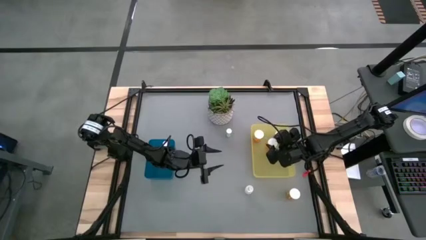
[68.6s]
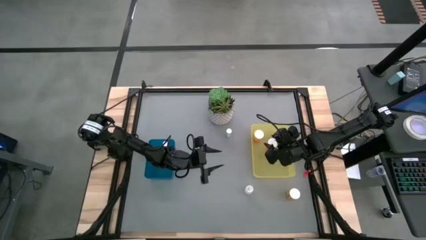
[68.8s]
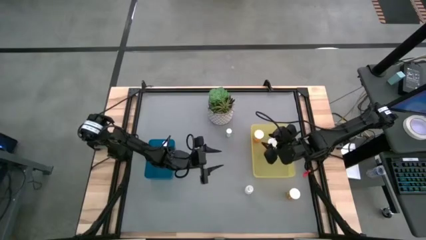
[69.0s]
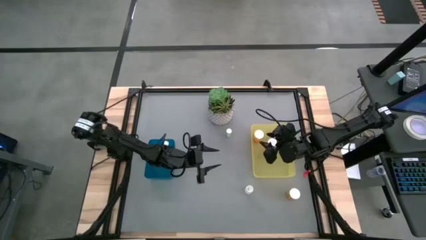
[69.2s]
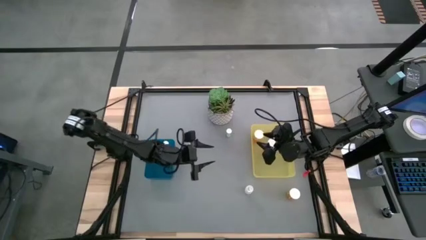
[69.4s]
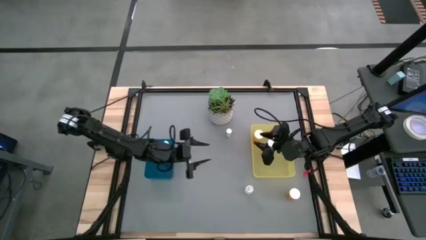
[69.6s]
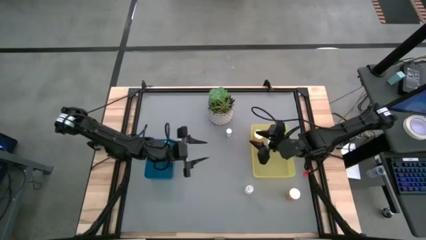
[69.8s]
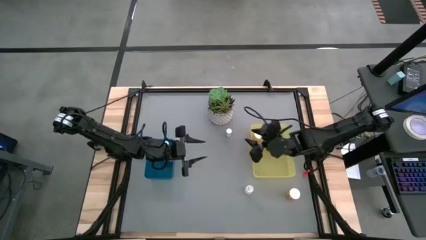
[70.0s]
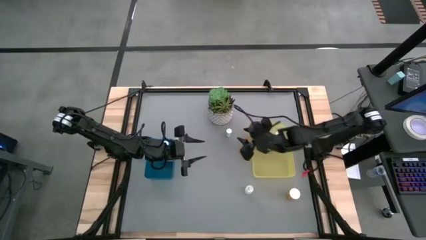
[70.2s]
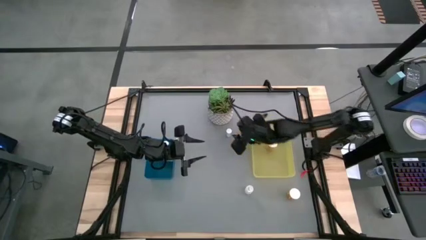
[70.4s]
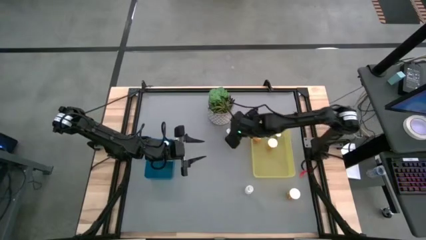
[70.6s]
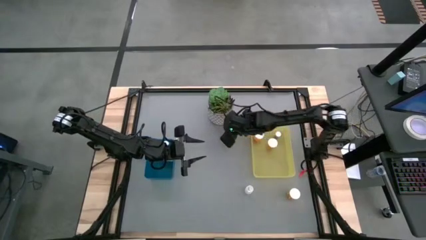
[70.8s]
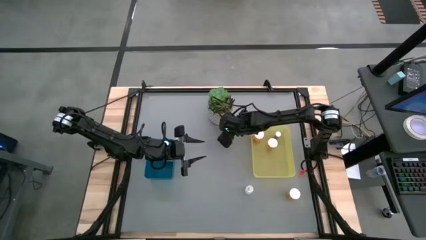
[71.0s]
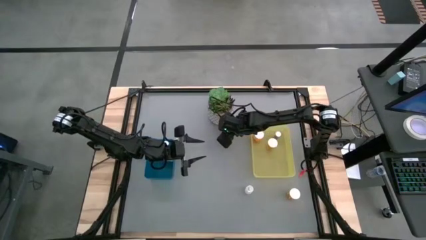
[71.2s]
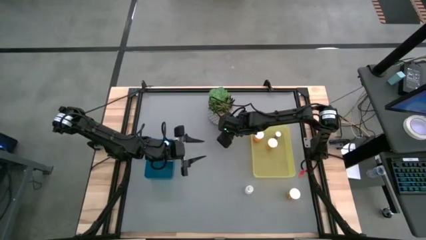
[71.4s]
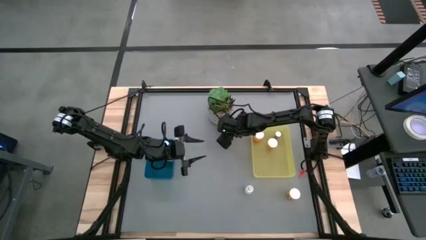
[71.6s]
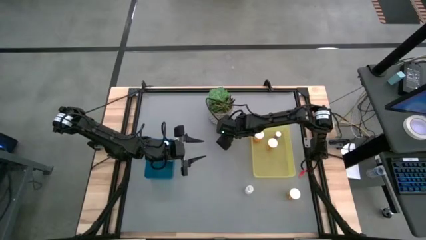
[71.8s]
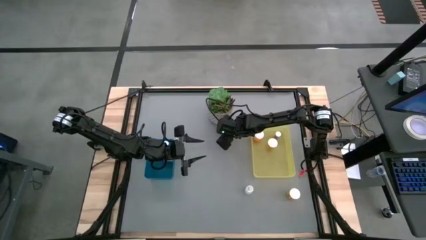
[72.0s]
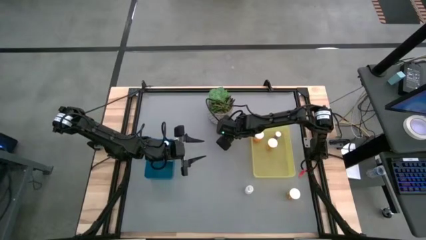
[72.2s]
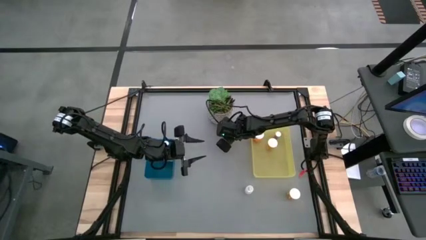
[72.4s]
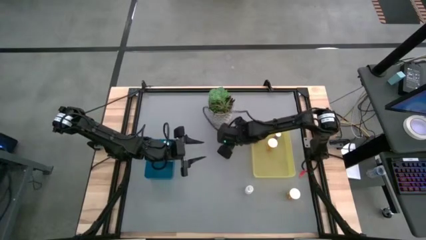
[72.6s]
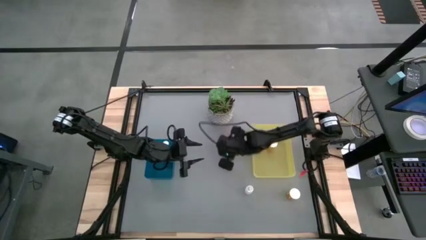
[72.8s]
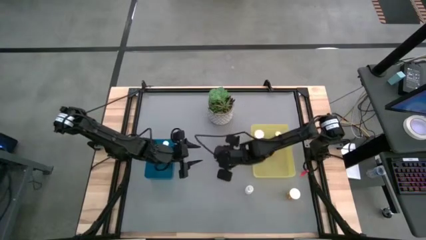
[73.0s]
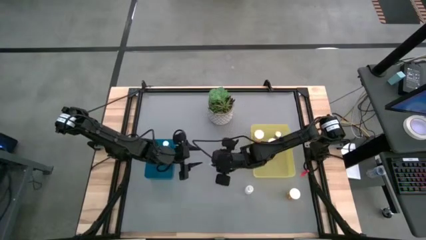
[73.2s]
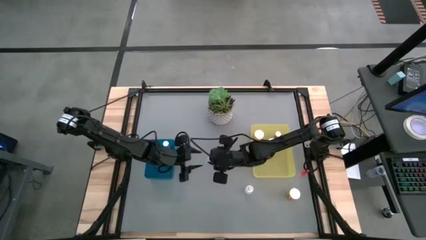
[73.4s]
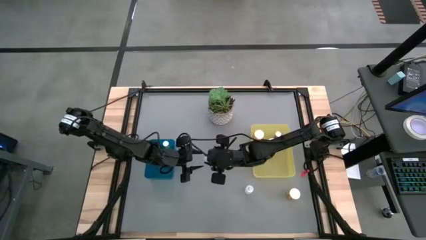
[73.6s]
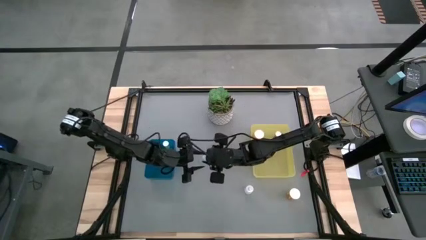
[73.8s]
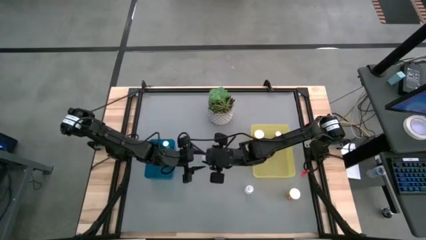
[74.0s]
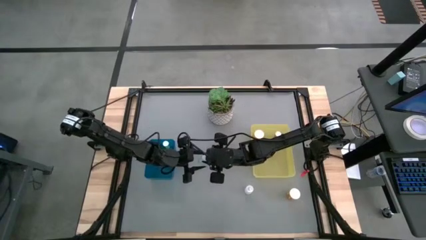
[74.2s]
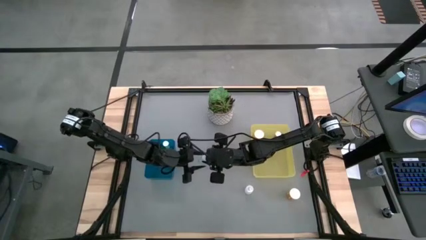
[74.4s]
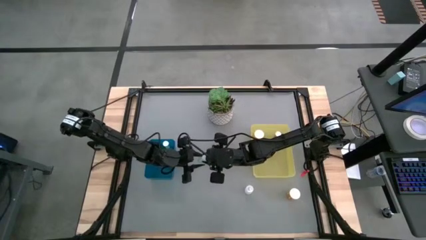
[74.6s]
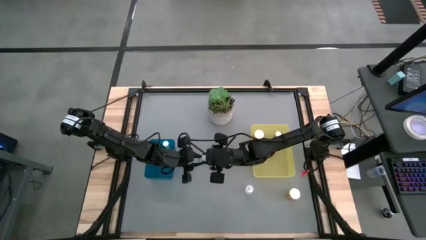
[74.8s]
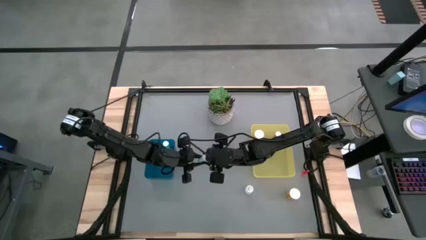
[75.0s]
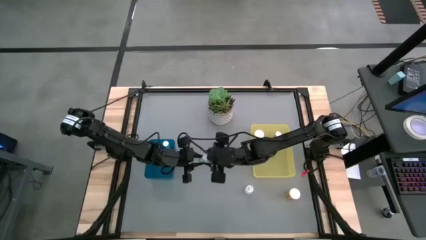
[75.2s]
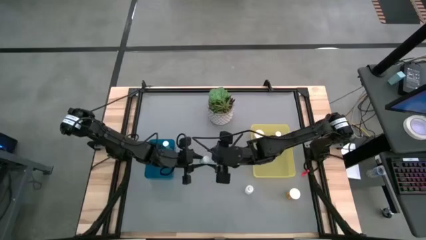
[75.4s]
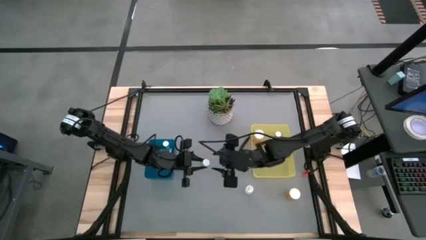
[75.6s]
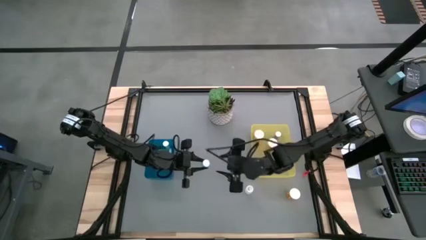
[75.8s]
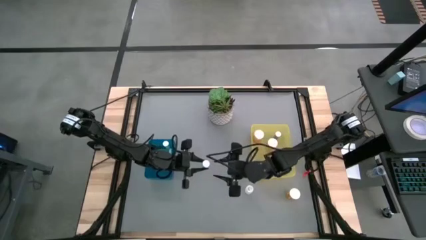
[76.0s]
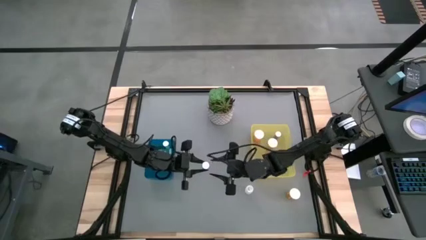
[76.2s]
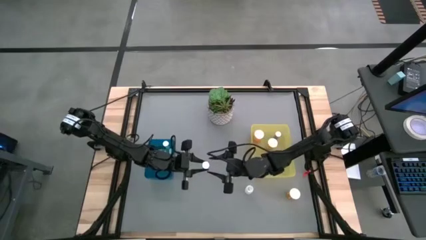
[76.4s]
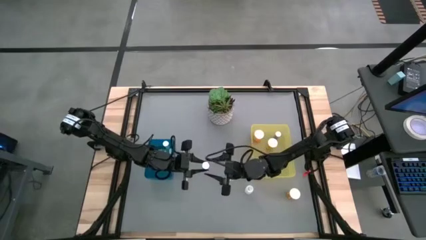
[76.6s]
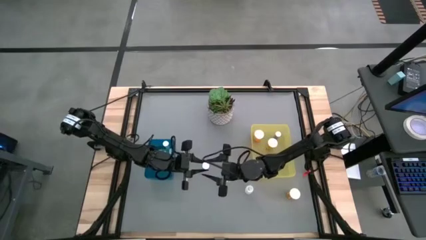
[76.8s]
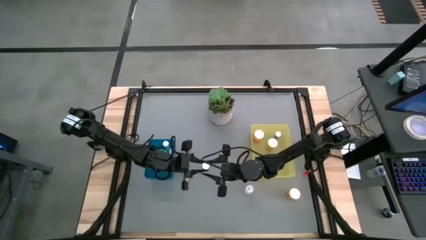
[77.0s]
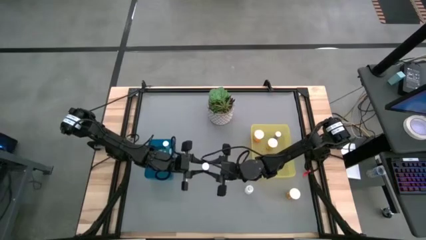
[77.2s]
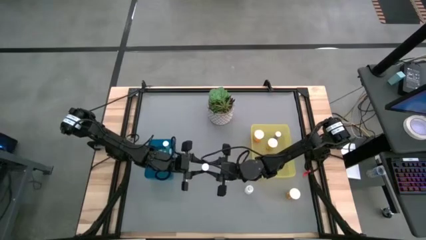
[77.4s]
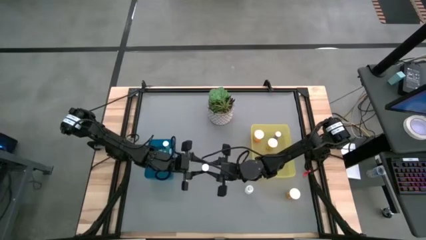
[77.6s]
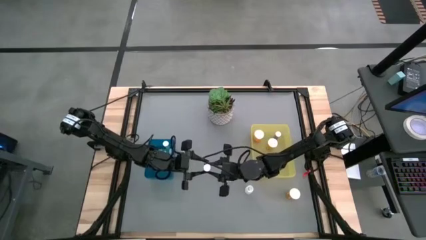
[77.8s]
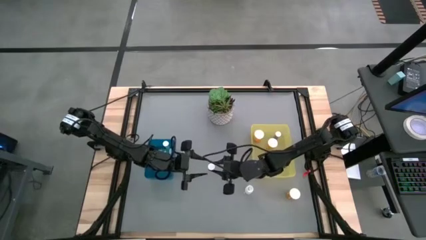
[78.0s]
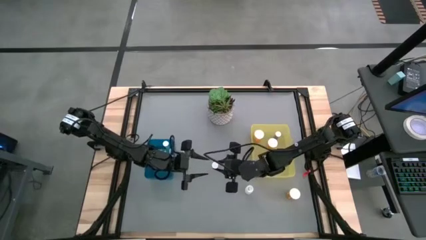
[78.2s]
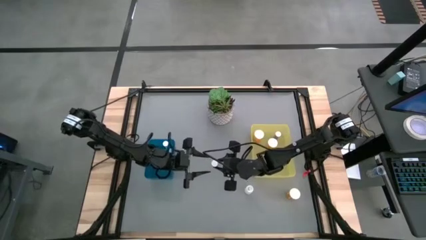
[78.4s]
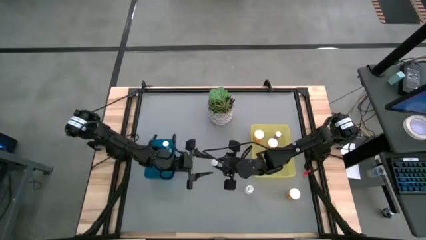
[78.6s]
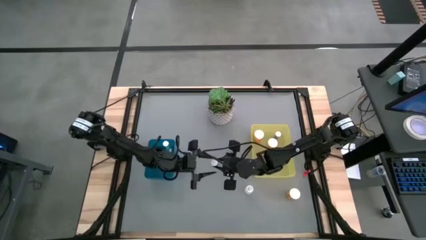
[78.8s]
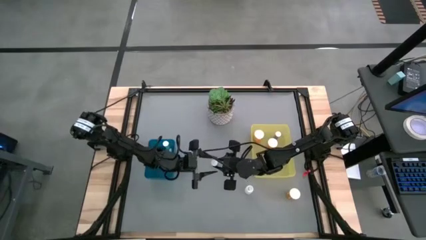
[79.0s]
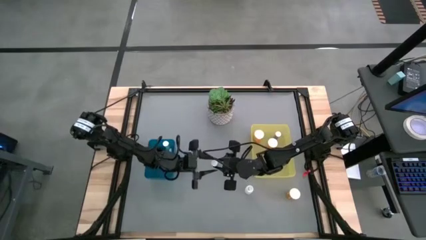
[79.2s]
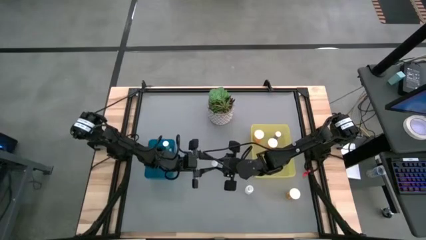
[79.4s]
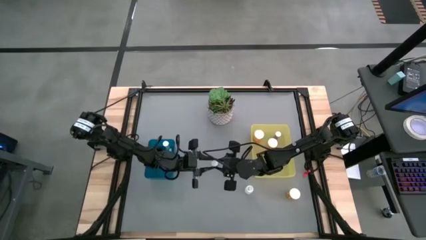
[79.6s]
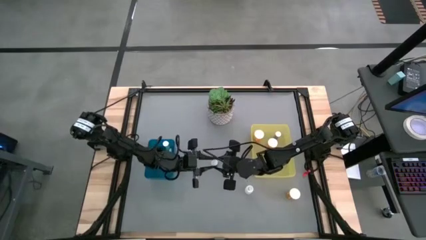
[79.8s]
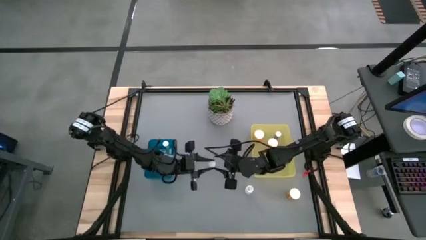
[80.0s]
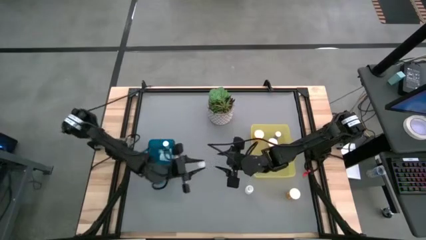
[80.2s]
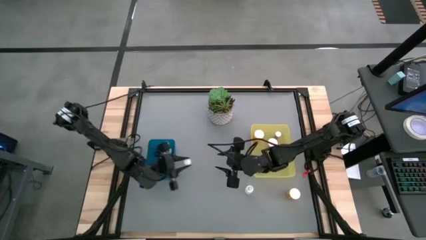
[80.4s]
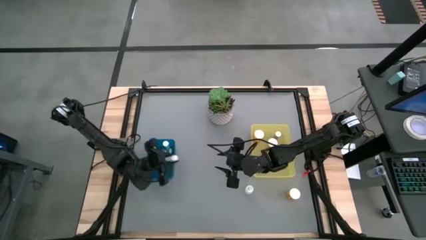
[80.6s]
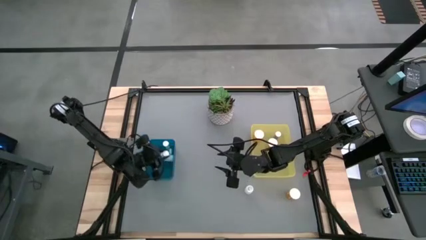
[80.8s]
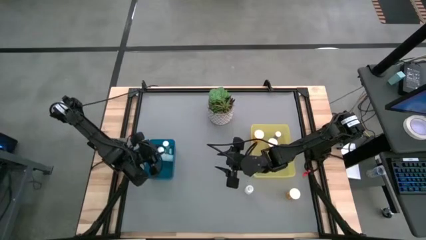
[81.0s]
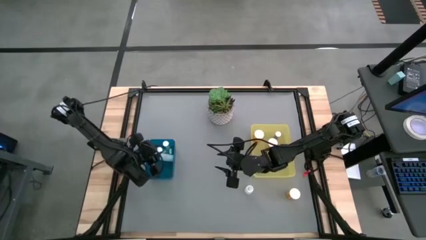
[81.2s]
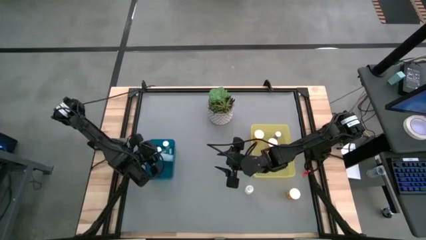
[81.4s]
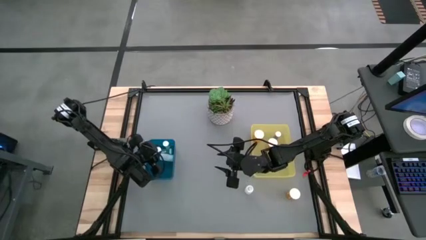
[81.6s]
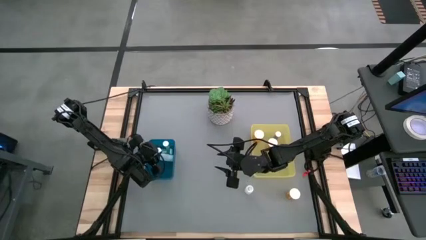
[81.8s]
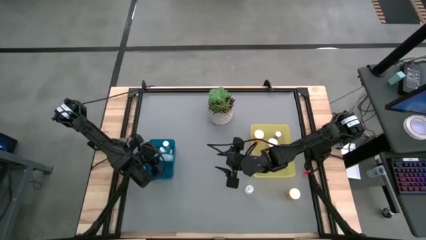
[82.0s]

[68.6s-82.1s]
Task: Pick and place medicine bottles into bin by pill shape (circle, oval)
Put the blue tablet bottle into the left blue bin
